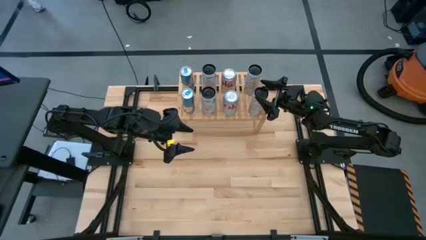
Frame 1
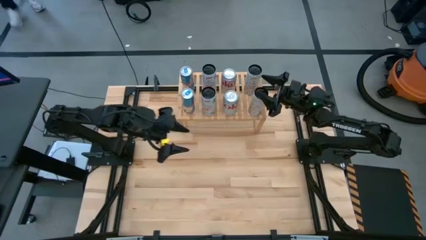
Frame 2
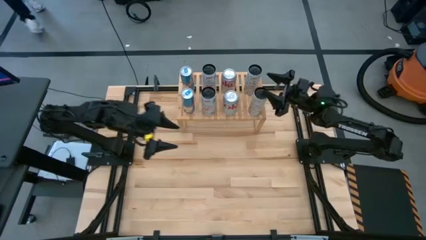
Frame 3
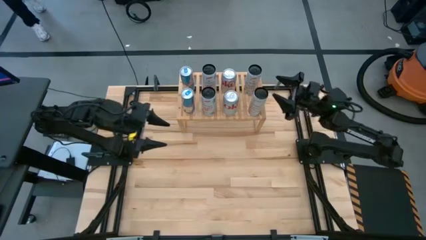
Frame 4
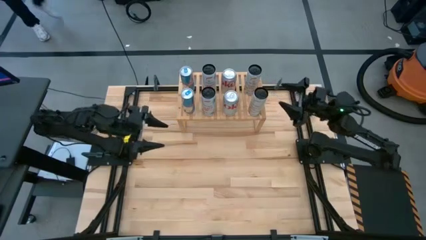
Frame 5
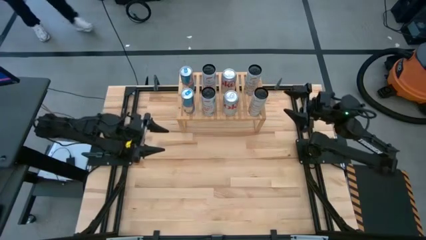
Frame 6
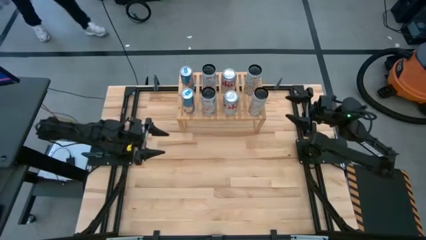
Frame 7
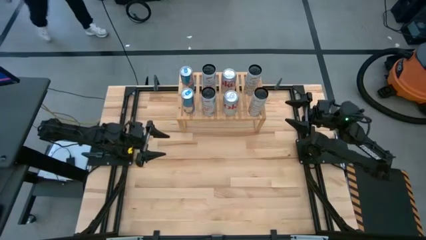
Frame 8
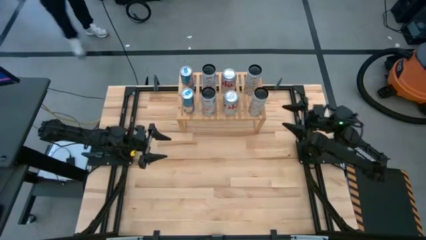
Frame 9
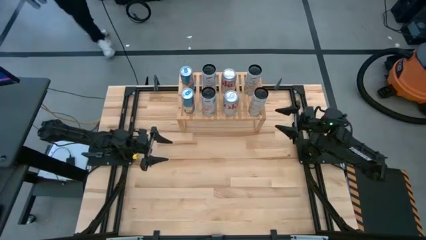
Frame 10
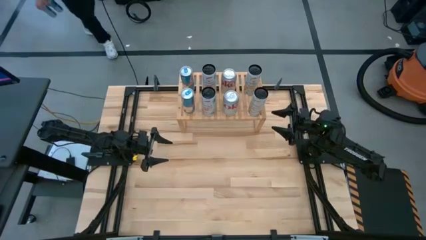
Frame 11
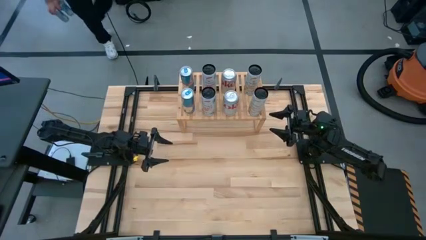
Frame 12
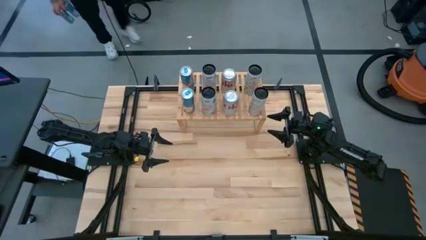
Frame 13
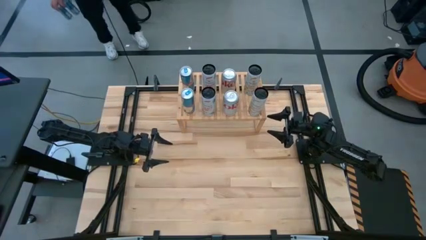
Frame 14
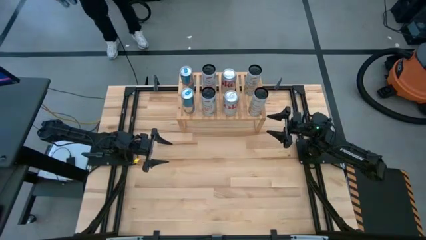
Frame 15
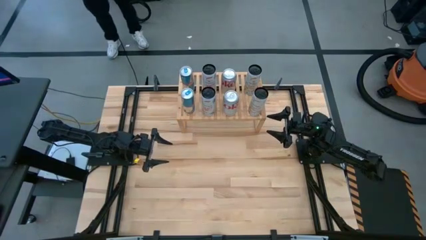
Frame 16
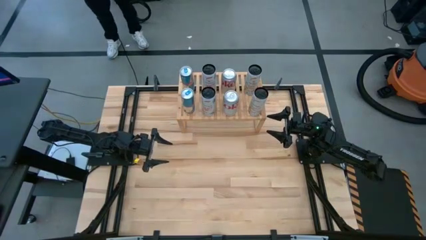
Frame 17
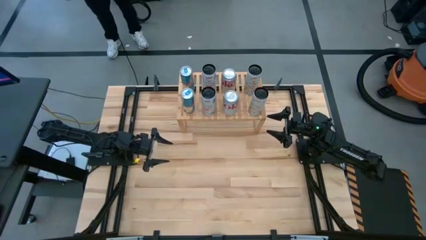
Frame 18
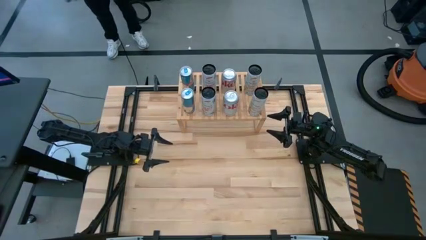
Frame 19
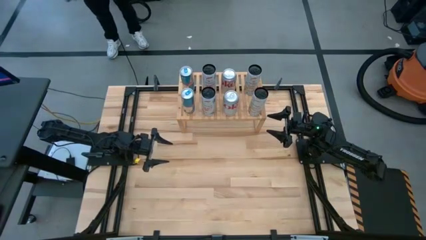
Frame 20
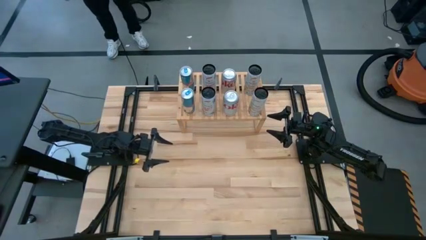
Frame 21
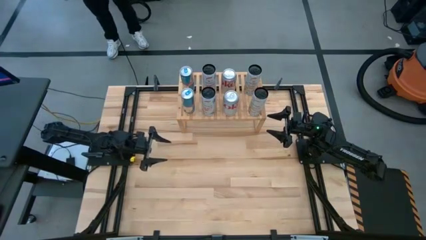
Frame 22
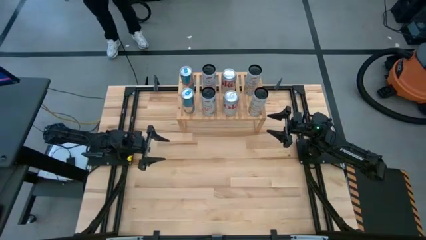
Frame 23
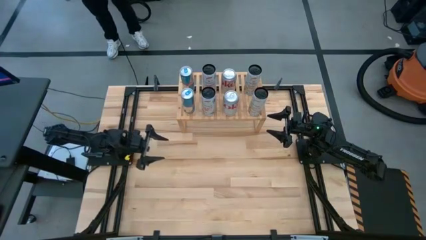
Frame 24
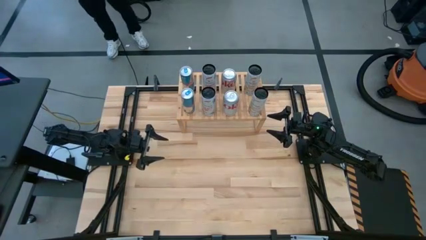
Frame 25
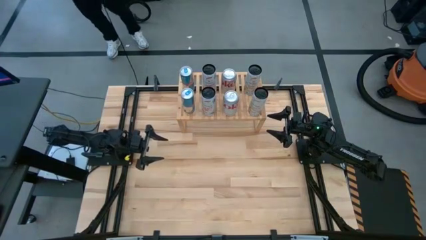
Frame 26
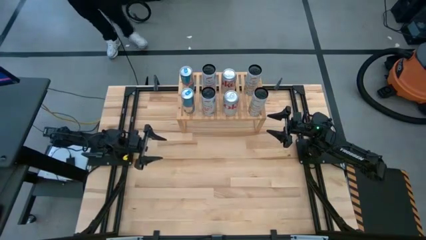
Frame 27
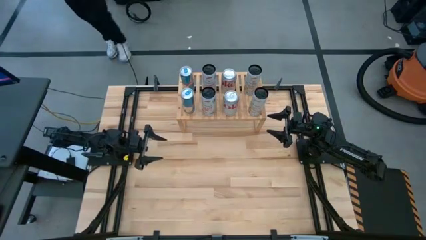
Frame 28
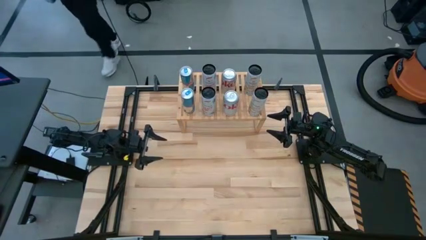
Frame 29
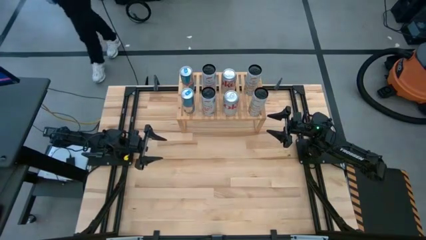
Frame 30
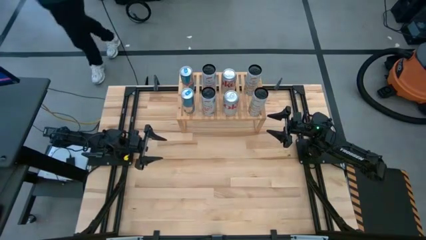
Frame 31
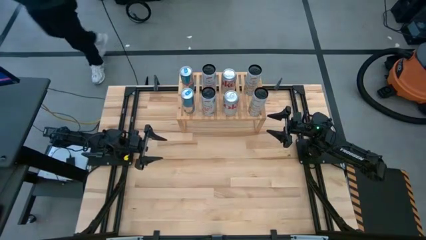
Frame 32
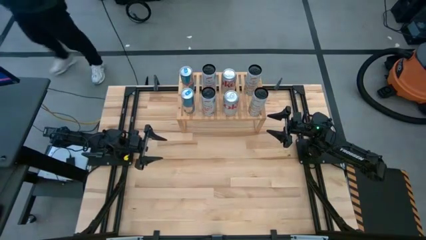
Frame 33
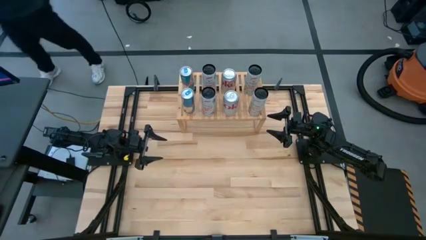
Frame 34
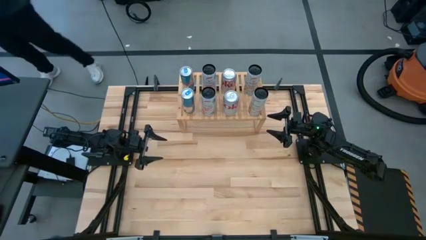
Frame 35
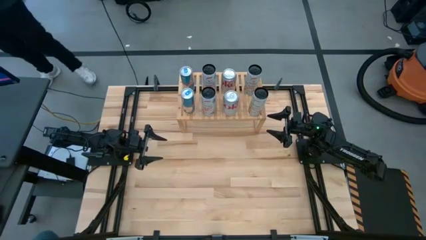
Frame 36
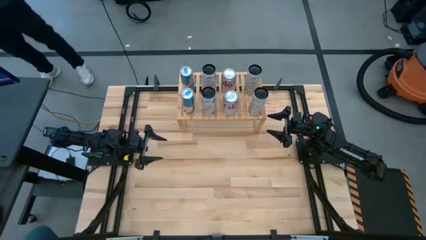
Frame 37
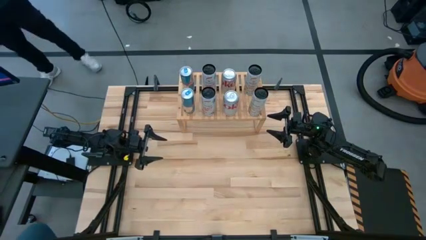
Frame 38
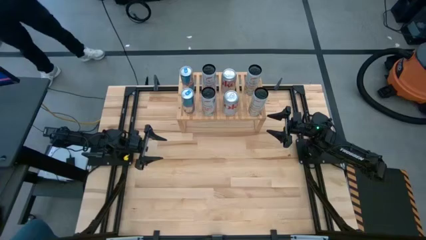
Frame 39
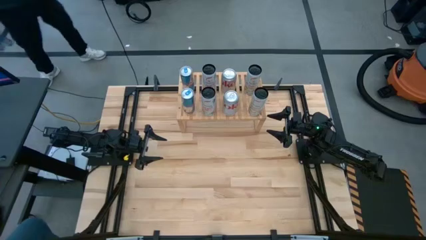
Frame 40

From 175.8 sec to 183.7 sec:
Task: Place canned beverage on shelf
Return to Home Position

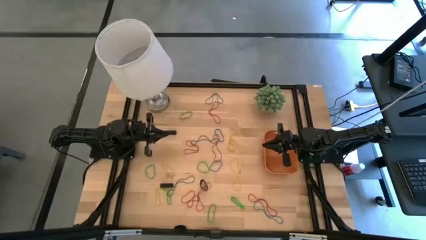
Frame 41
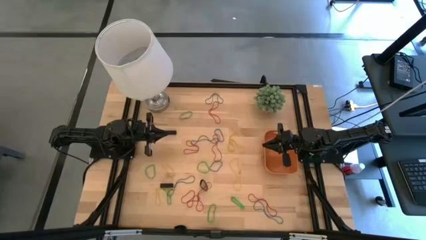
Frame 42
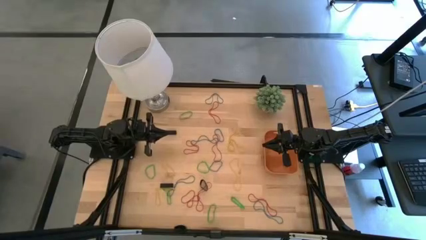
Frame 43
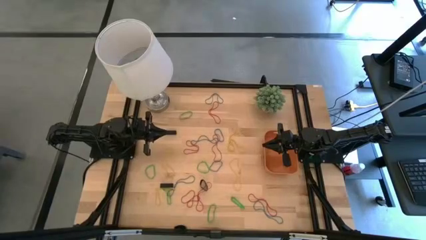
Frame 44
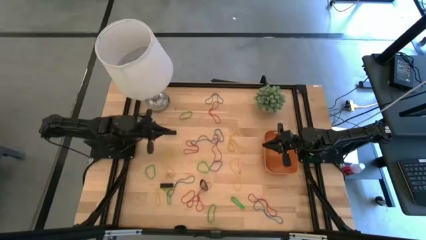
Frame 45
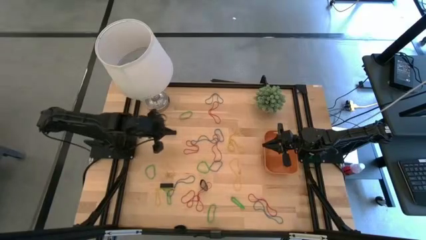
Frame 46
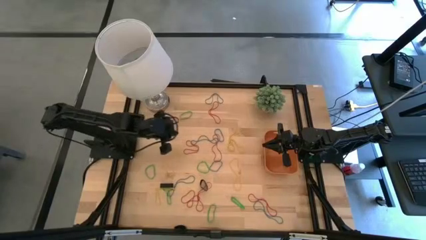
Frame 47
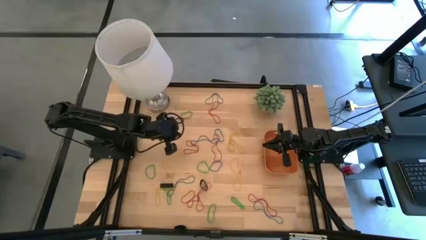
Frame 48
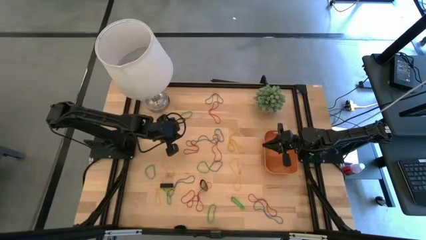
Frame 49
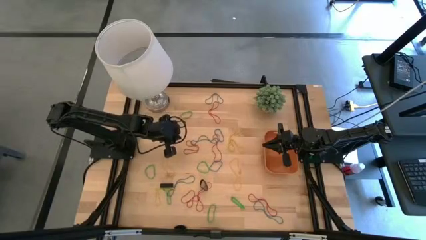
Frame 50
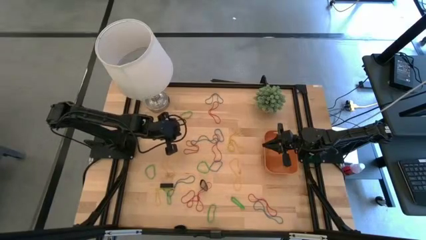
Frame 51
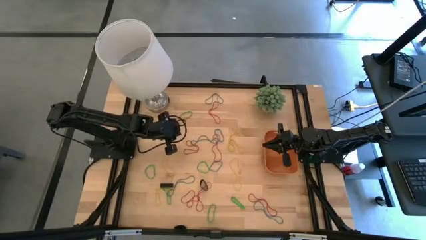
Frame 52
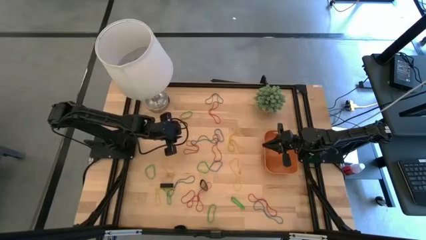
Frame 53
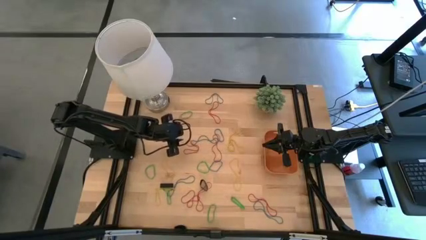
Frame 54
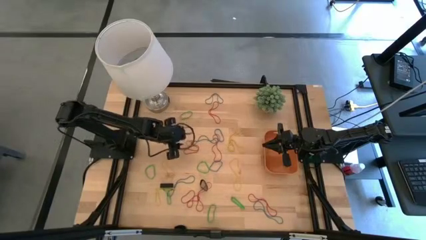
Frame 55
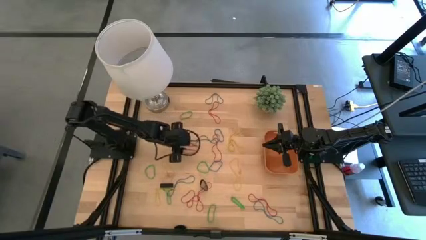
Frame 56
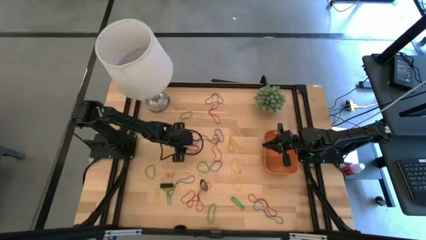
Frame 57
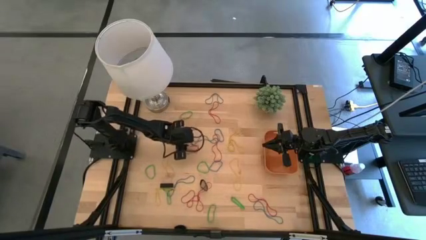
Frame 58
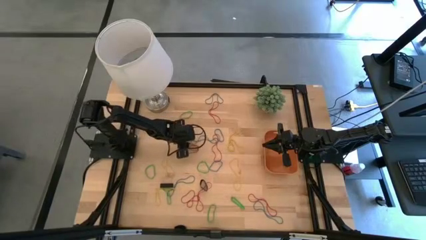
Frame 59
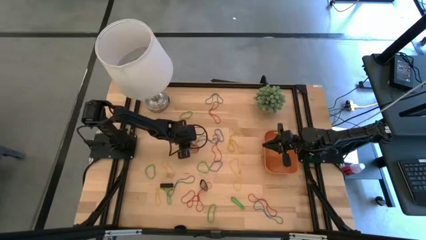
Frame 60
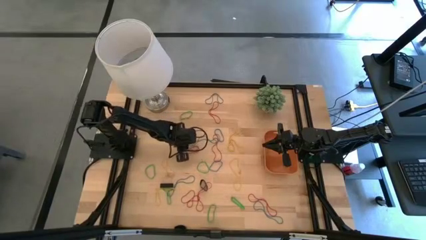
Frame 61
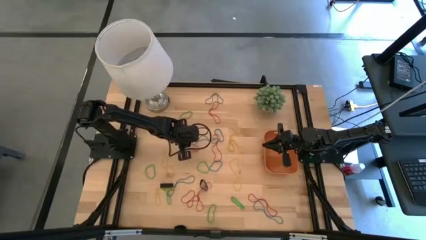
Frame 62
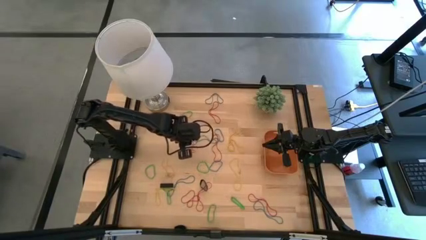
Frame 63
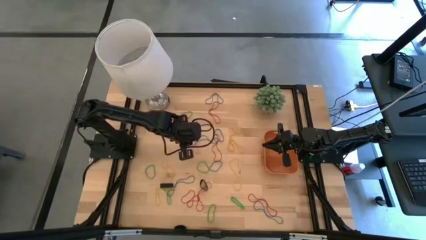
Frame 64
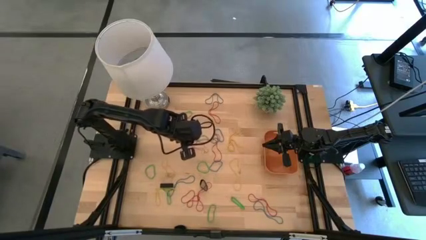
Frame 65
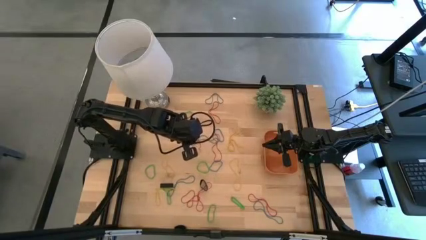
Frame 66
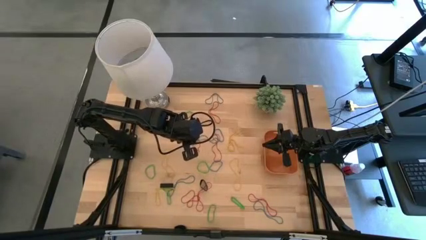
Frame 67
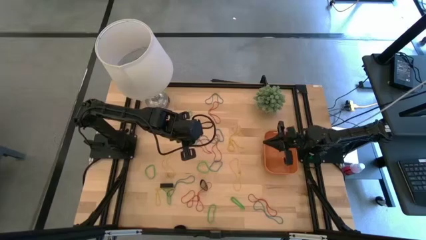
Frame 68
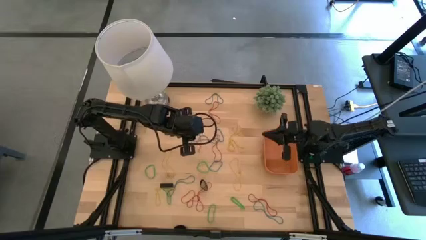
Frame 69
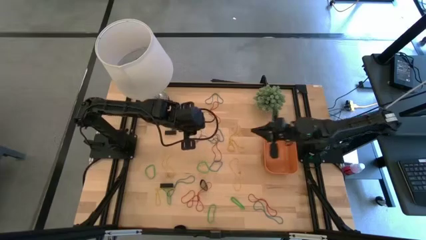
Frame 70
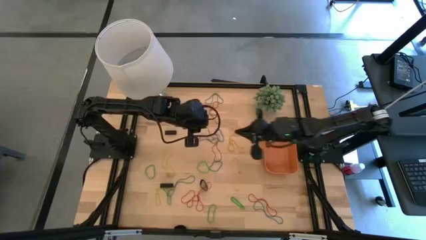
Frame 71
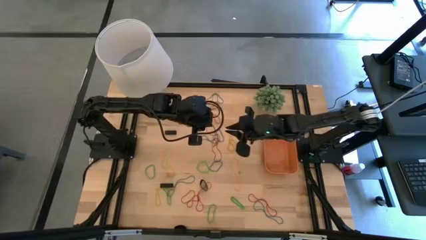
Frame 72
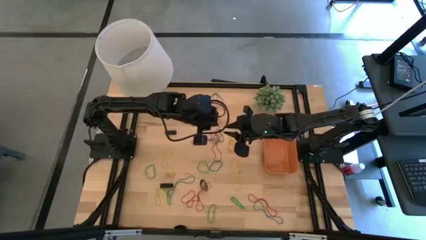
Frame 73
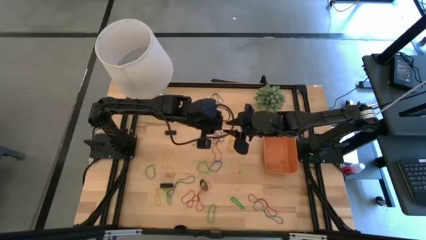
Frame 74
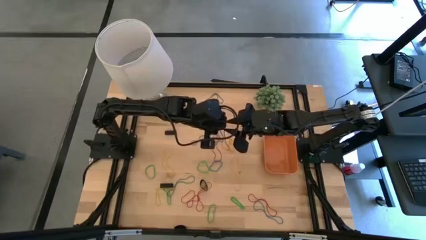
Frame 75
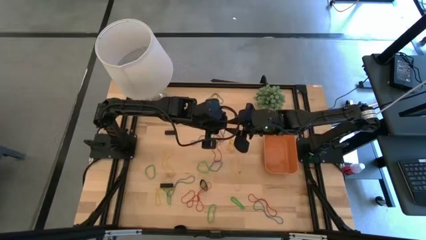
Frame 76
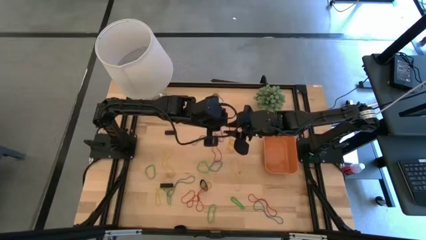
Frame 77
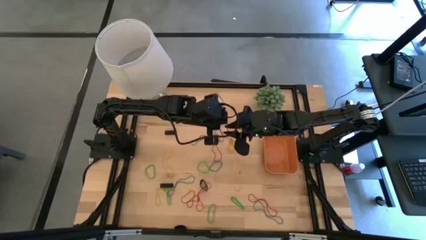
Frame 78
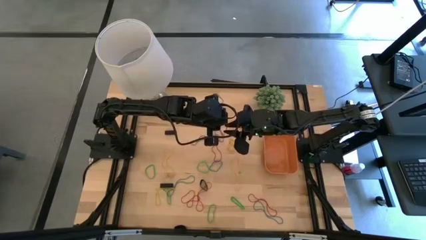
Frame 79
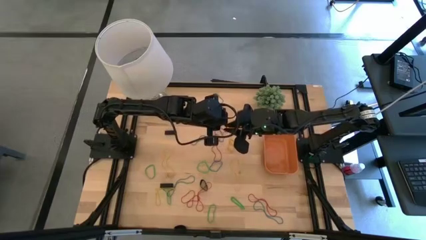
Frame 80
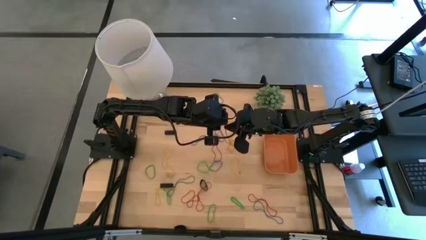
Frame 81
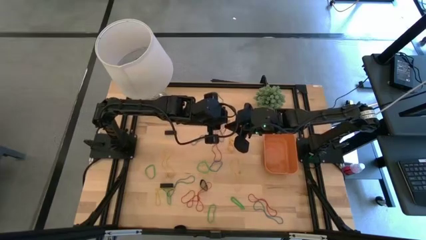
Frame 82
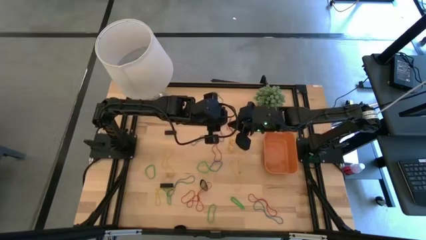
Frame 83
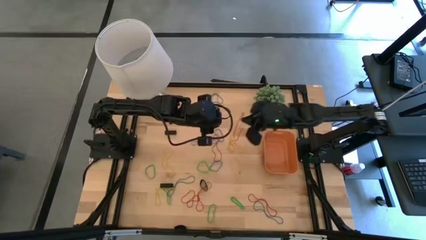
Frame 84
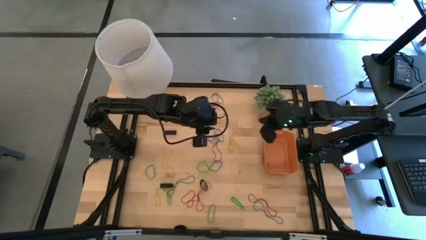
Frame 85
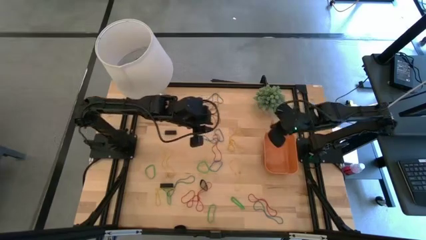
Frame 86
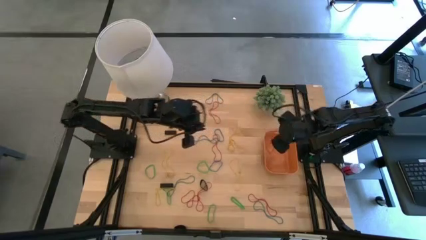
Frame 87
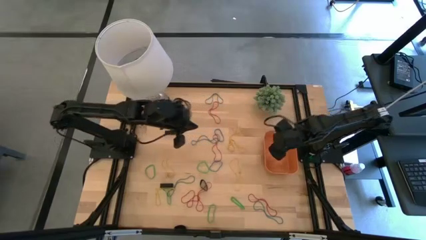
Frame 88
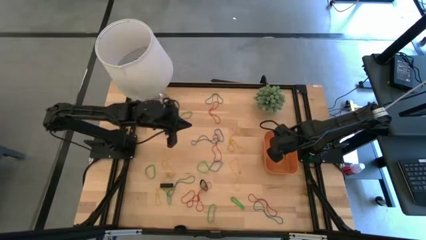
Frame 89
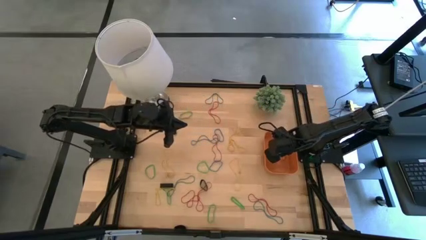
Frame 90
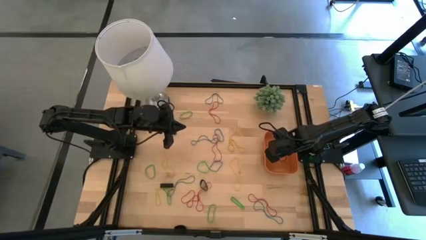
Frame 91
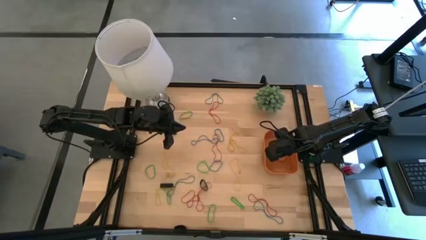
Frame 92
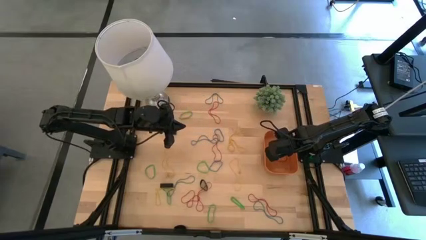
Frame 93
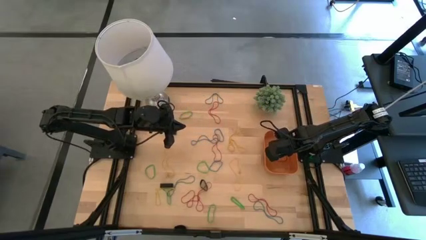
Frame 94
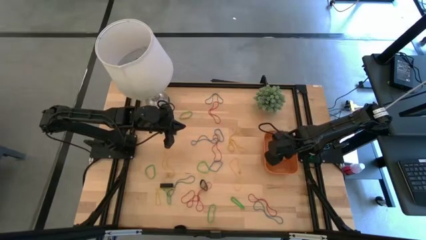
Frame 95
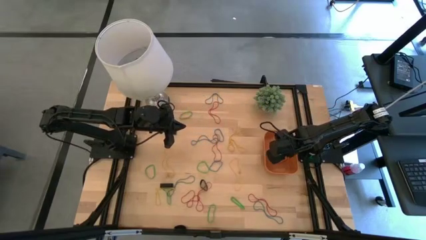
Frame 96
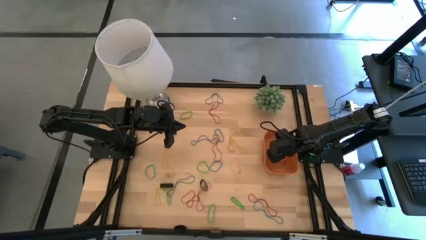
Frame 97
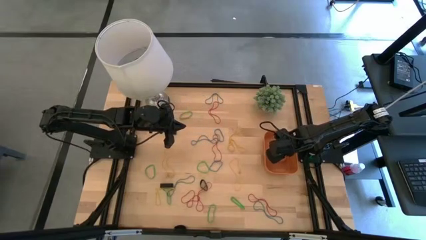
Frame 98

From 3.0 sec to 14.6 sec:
Task: Pick and place rubber bands into bin
Put the red rubber band into the orange bin
